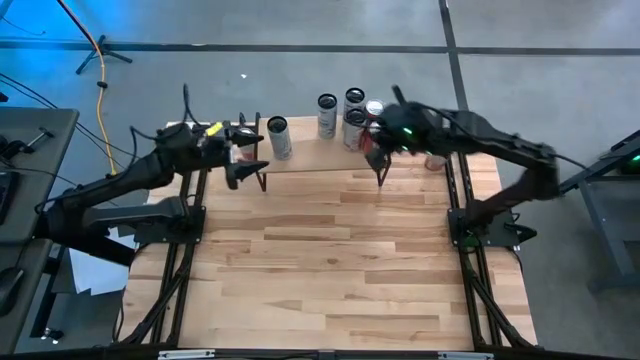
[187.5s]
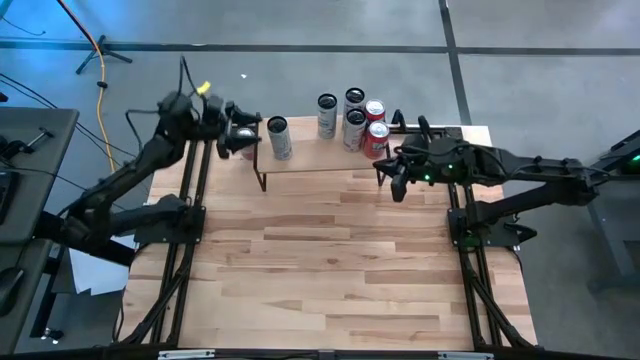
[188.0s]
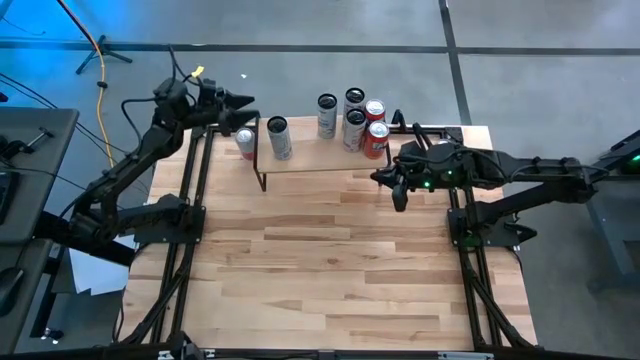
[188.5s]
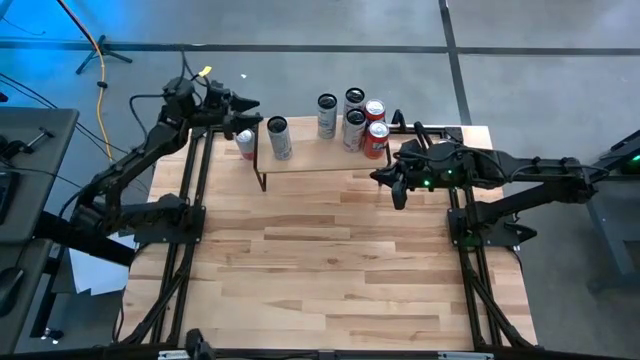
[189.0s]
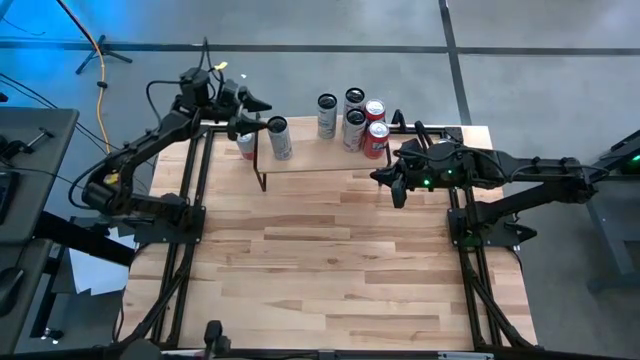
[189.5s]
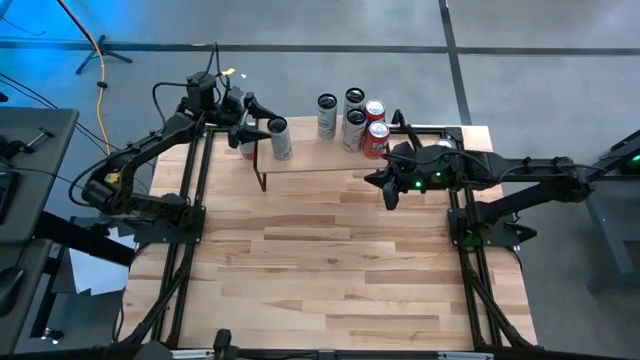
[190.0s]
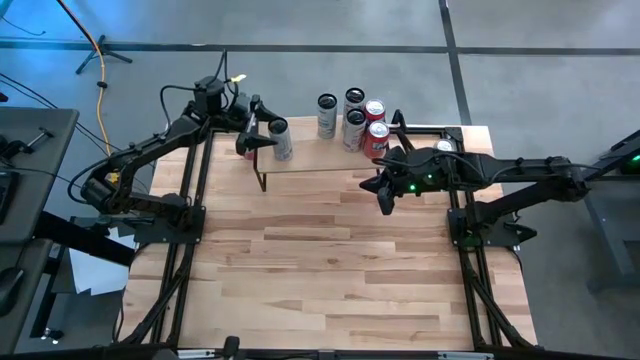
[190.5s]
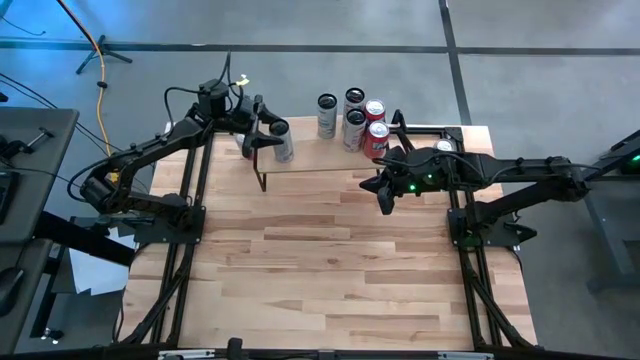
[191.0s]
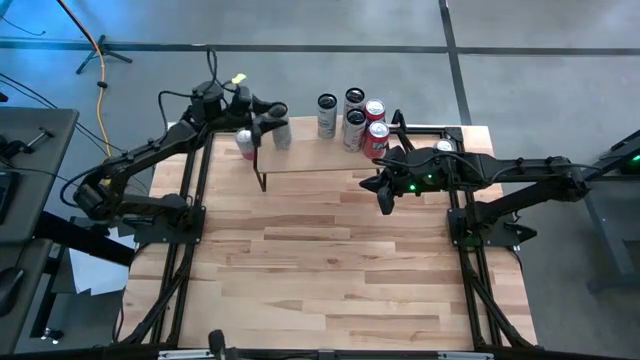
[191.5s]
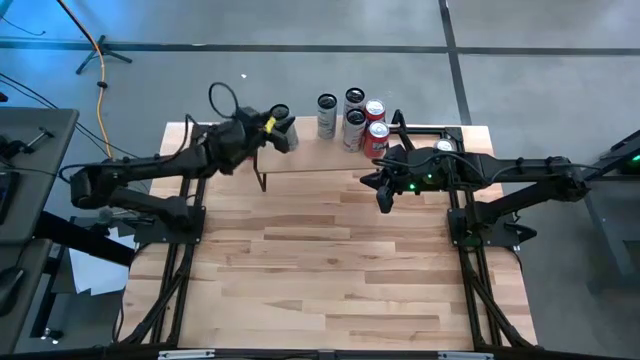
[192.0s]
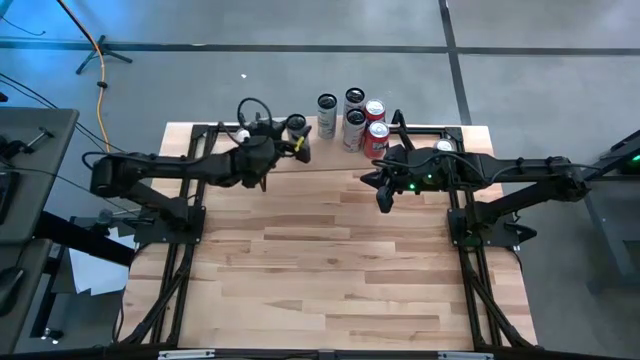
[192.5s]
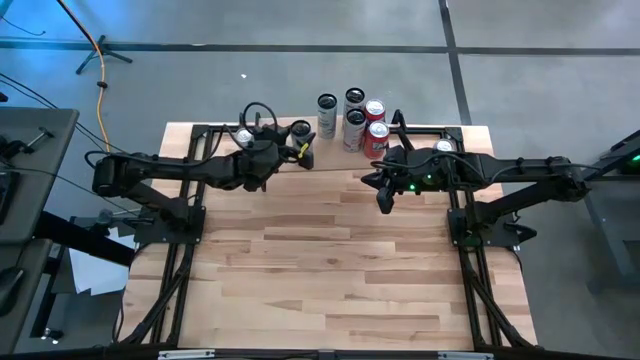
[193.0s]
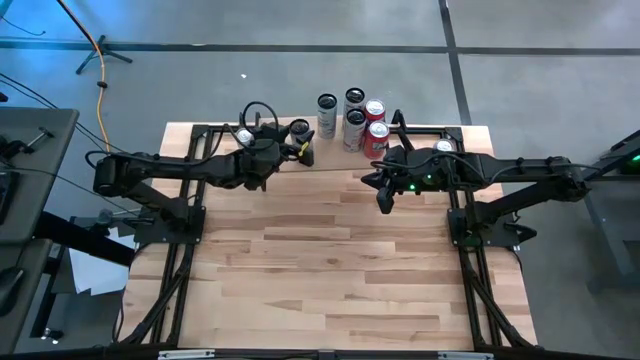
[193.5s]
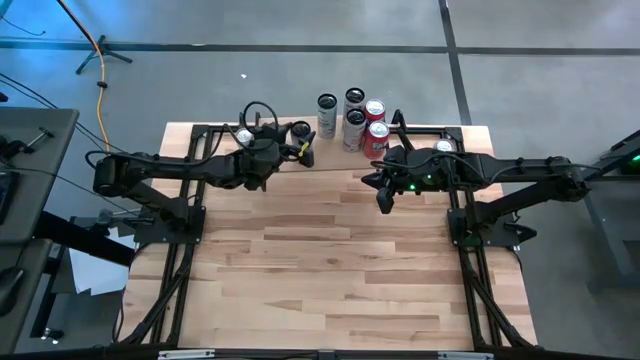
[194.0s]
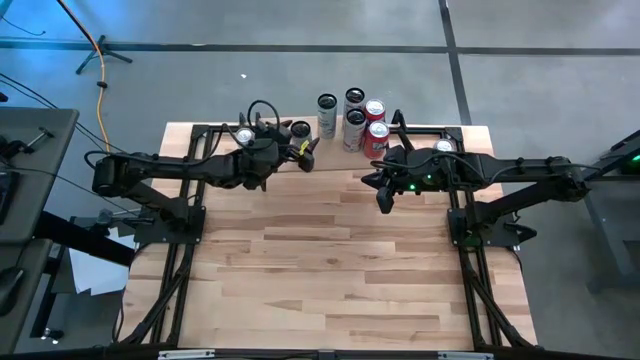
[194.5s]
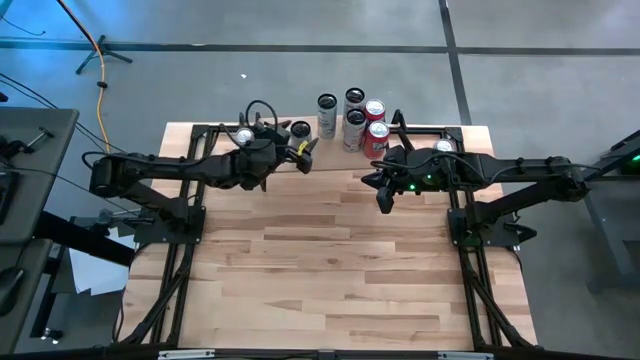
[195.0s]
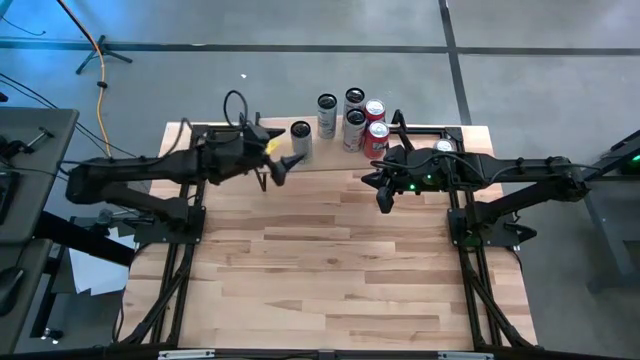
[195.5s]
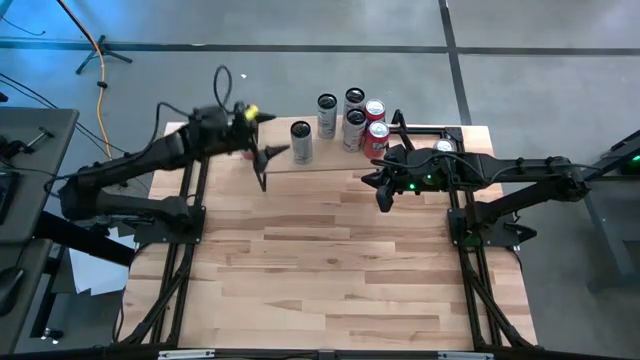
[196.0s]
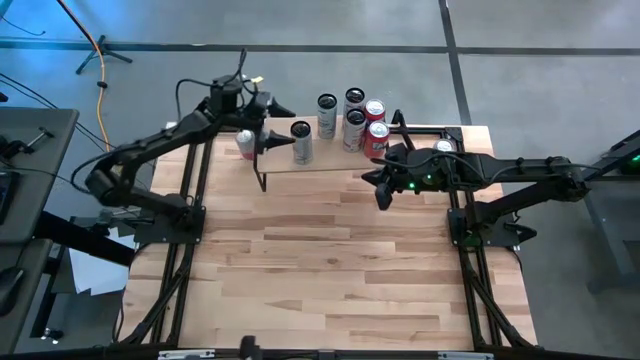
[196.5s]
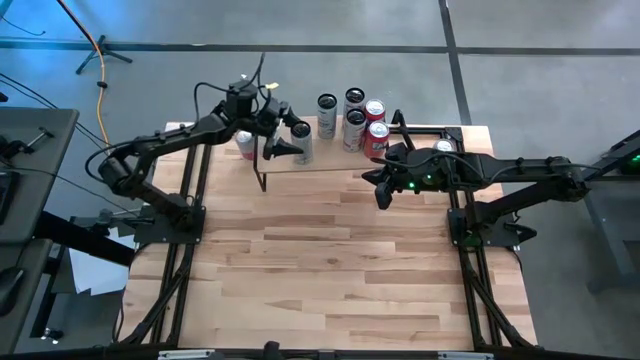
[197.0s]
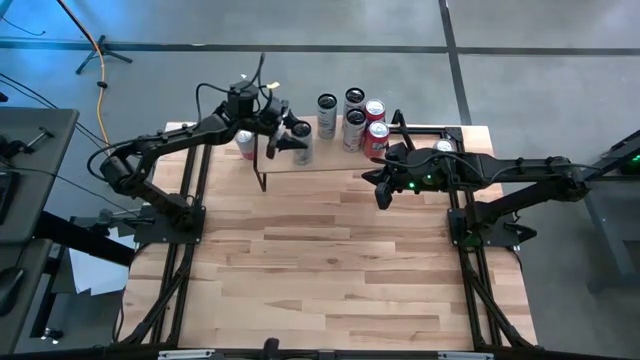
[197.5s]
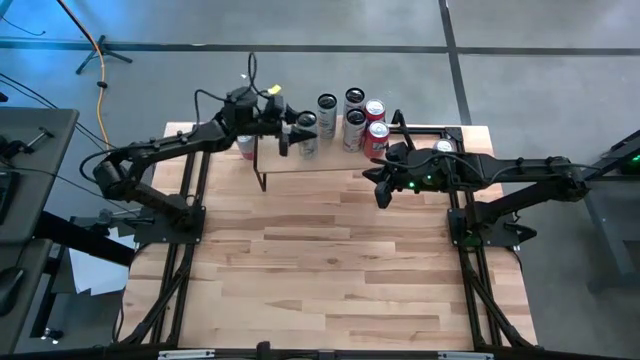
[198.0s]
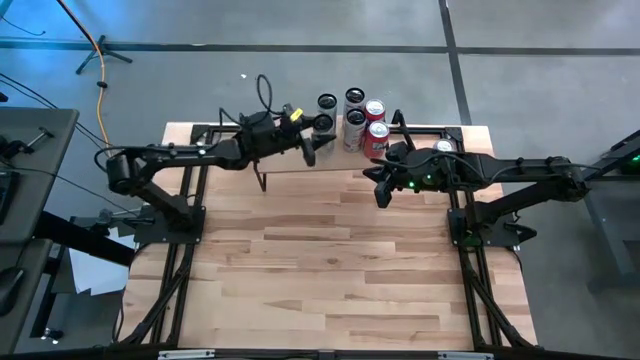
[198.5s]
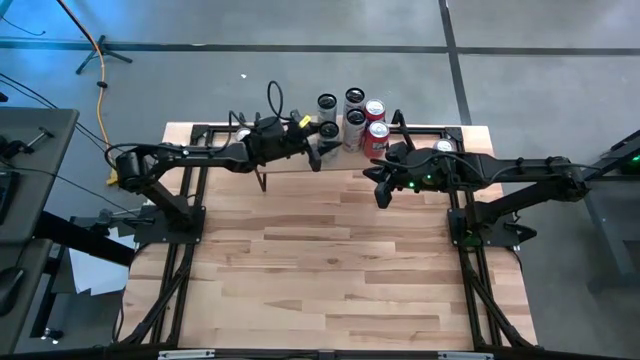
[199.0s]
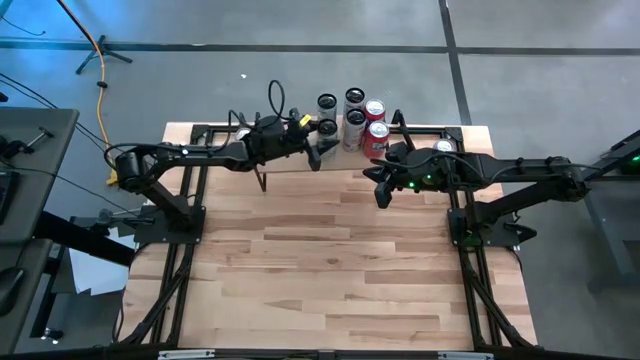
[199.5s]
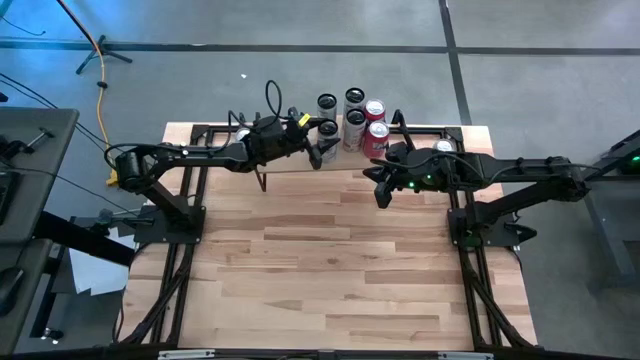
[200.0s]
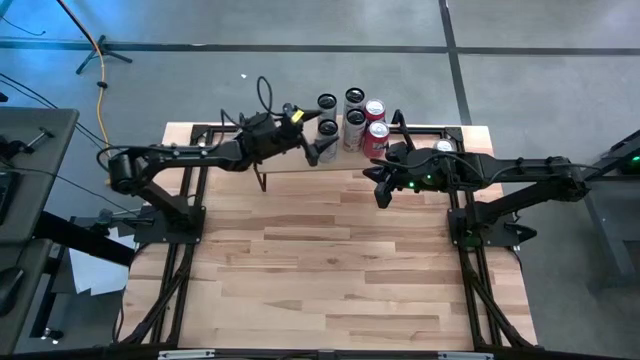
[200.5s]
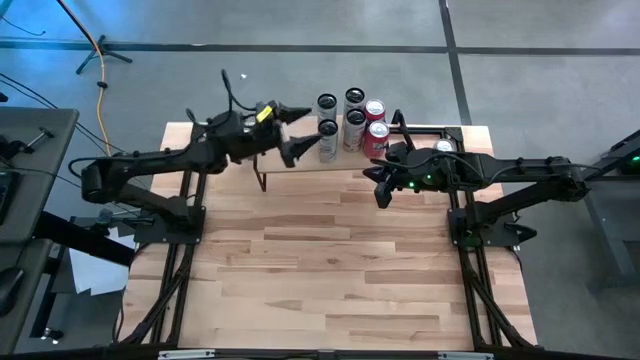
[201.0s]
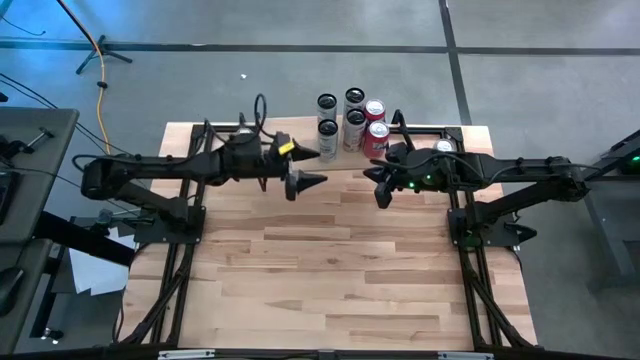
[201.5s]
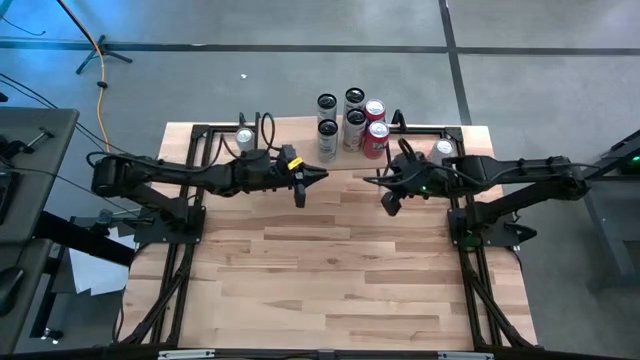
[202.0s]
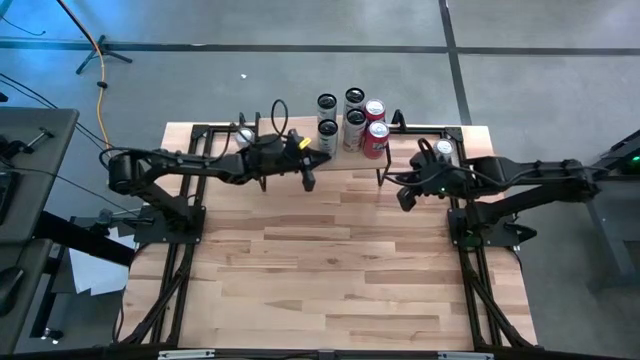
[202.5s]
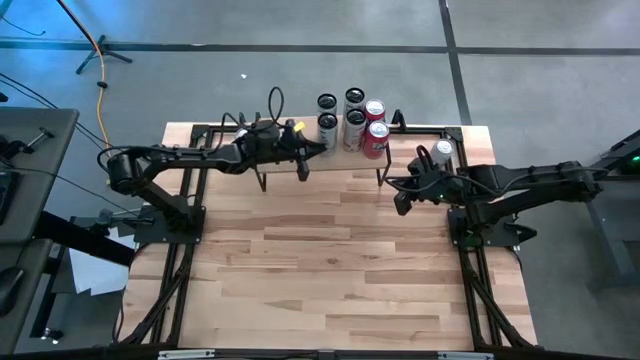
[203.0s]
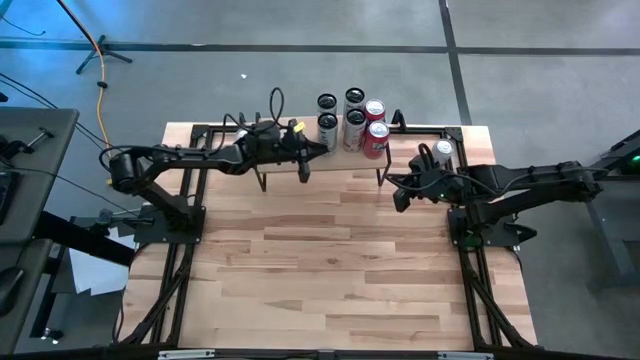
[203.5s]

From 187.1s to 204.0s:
Task: Place canned beverage on shelf
Put the black blue soda can on the shelf

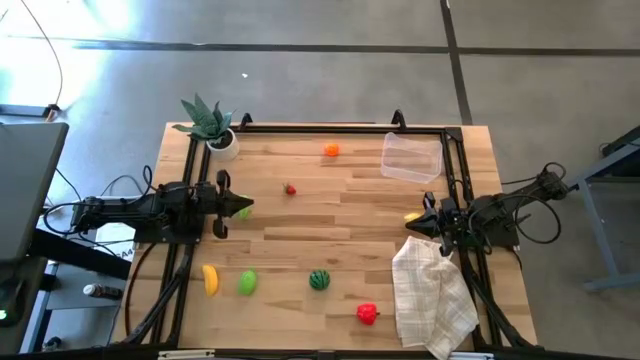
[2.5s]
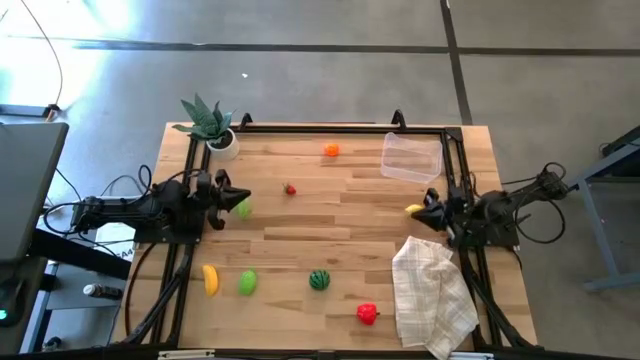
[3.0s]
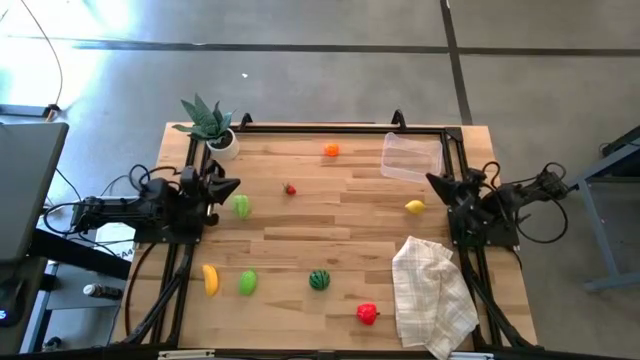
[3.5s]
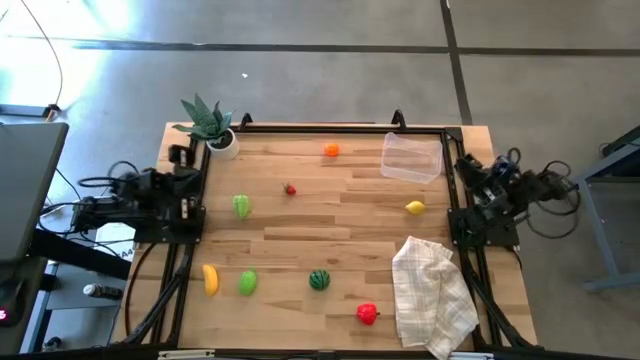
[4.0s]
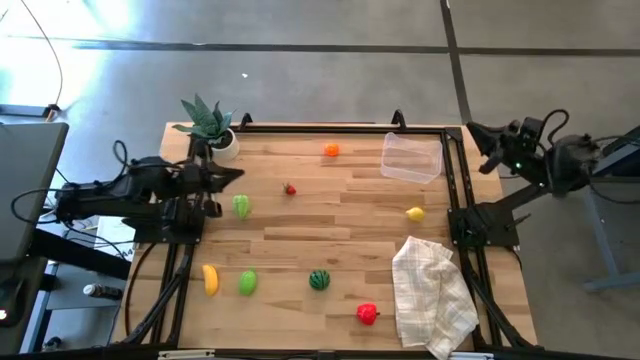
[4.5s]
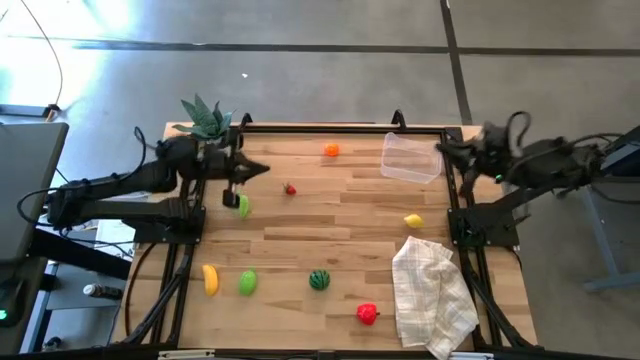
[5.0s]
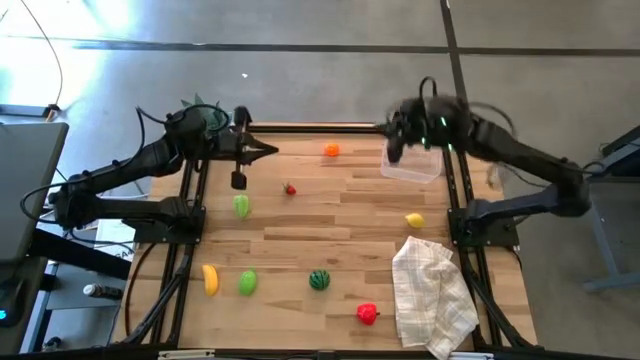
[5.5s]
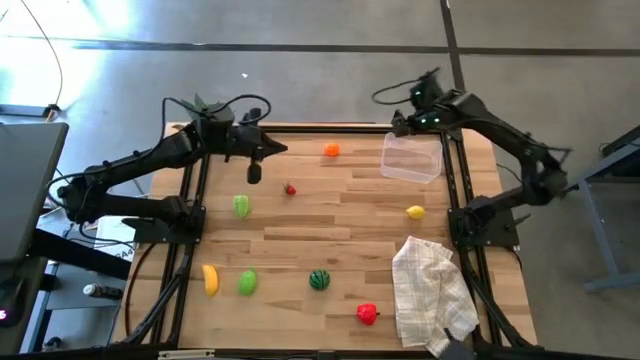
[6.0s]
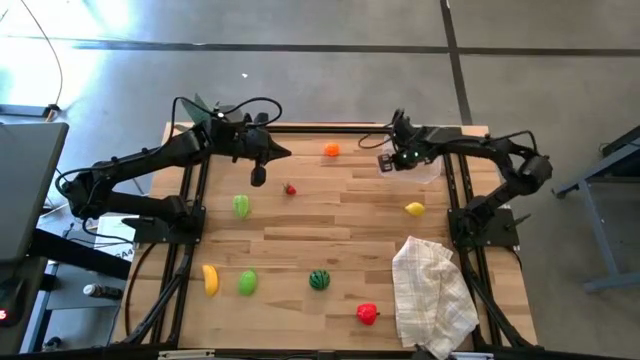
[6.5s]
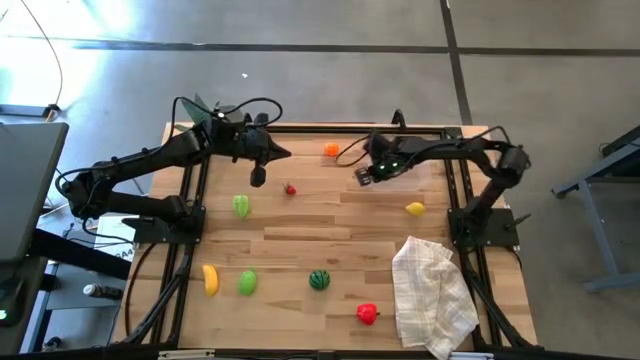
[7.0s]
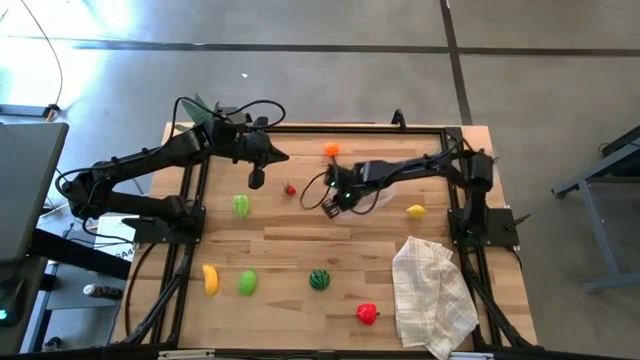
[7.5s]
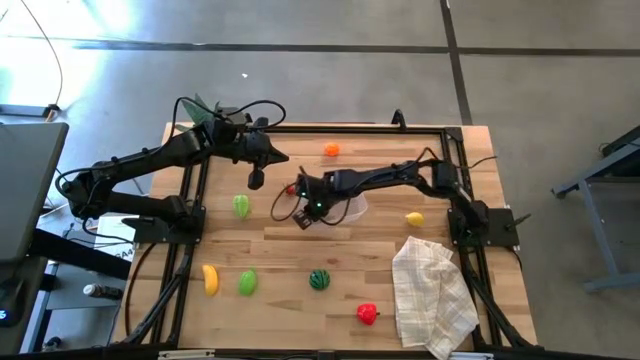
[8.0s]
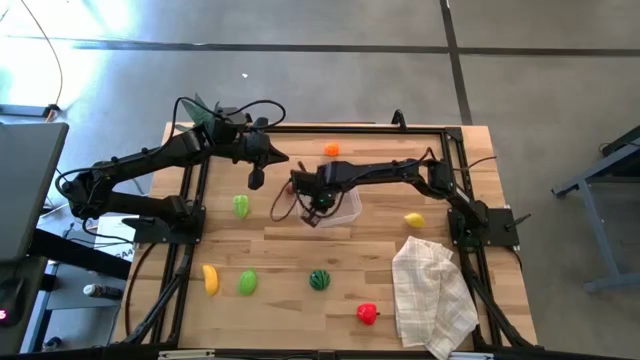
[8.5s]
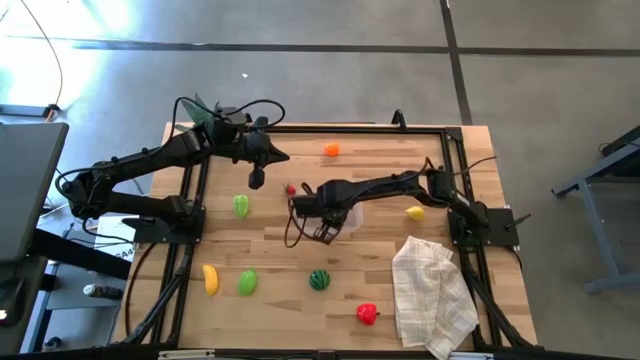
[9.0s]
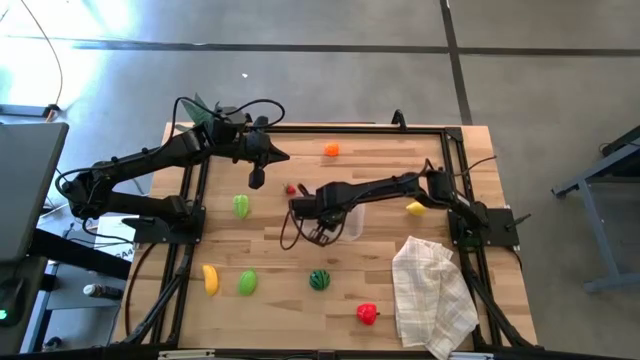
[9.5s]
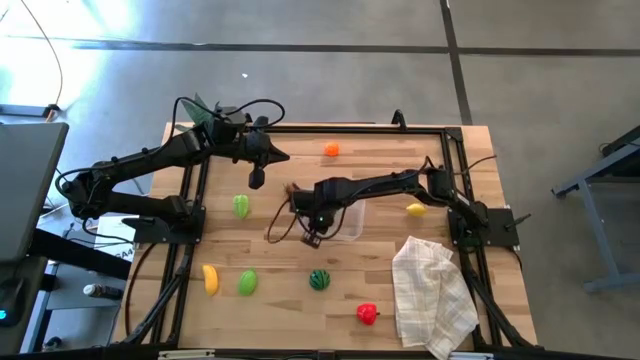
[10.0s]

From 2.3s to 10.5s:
Task: Pick and placing Produce into tupperware
Move the transparent bin to the center of the table
